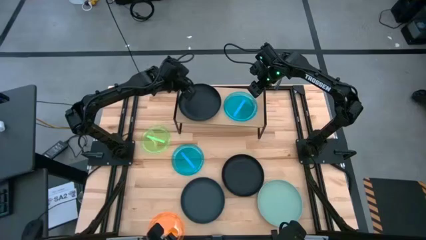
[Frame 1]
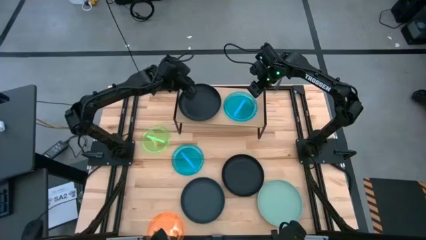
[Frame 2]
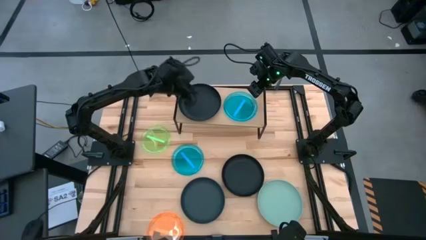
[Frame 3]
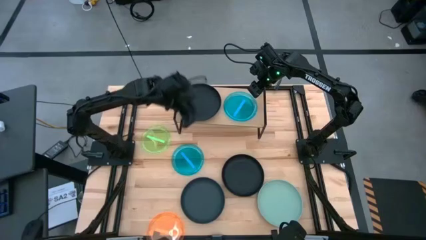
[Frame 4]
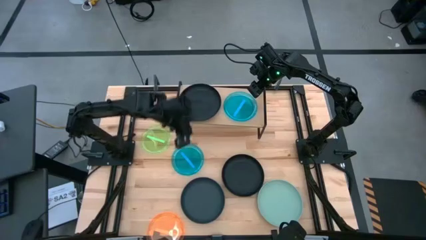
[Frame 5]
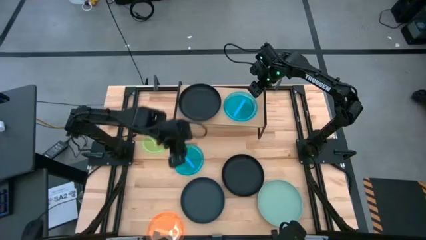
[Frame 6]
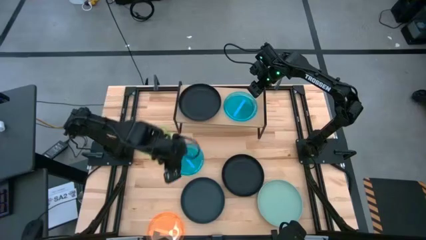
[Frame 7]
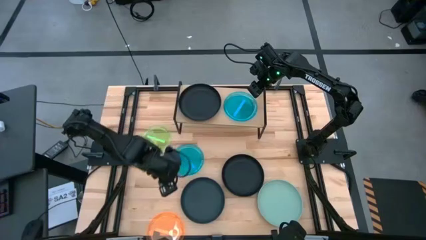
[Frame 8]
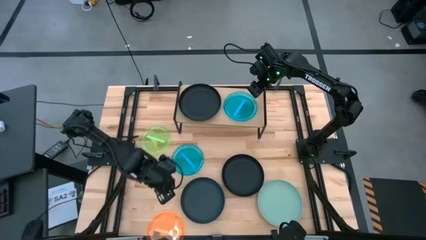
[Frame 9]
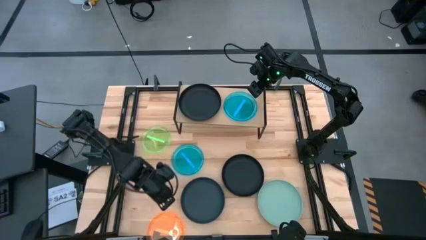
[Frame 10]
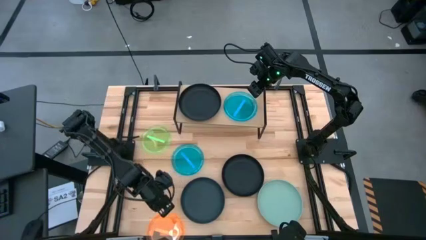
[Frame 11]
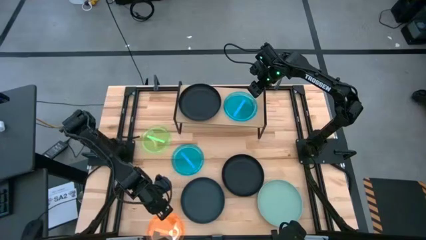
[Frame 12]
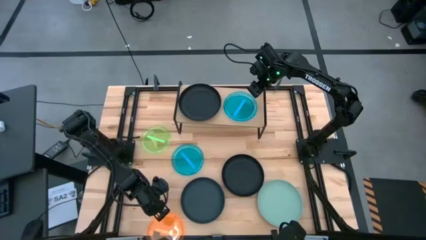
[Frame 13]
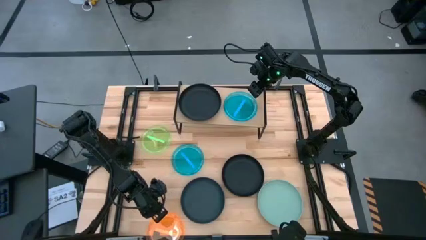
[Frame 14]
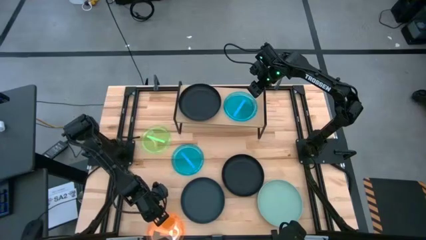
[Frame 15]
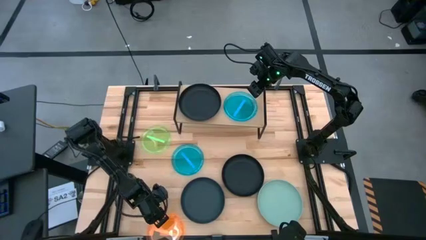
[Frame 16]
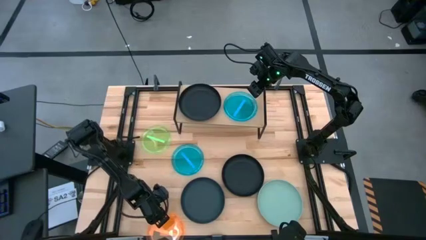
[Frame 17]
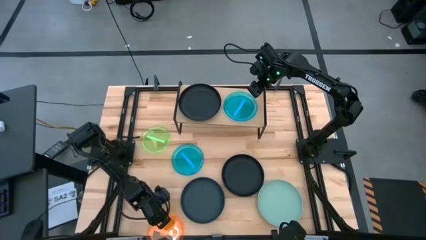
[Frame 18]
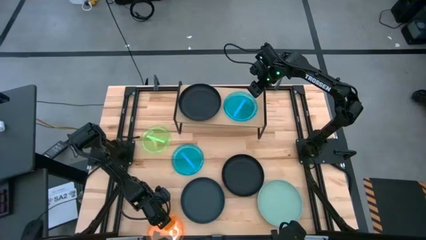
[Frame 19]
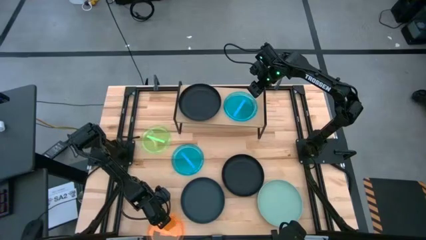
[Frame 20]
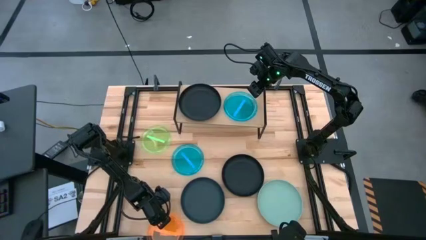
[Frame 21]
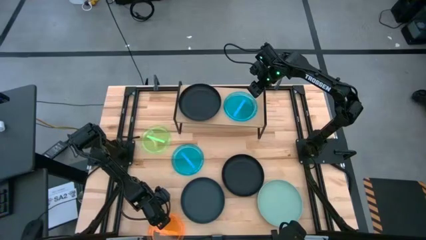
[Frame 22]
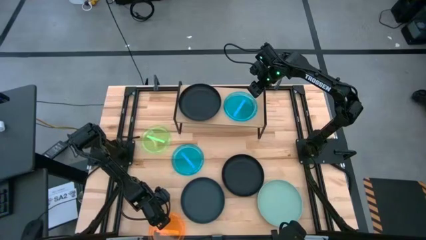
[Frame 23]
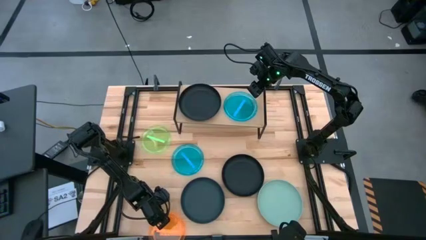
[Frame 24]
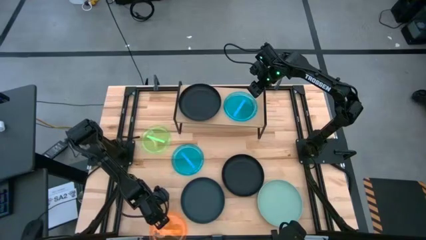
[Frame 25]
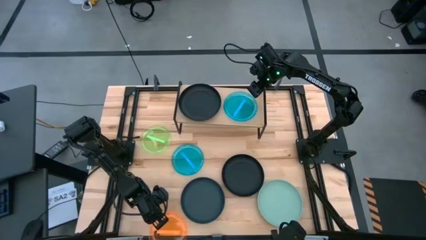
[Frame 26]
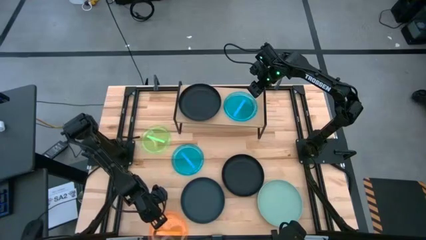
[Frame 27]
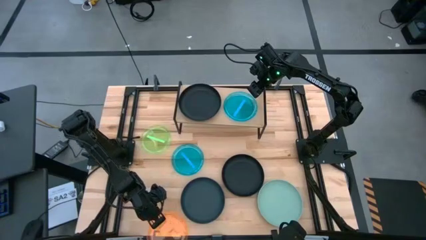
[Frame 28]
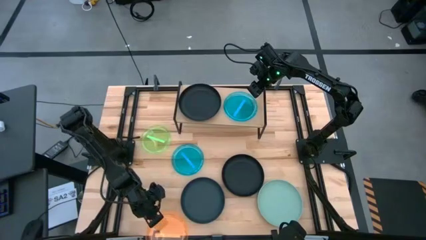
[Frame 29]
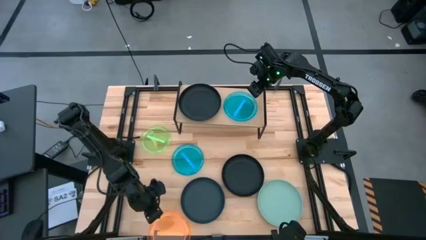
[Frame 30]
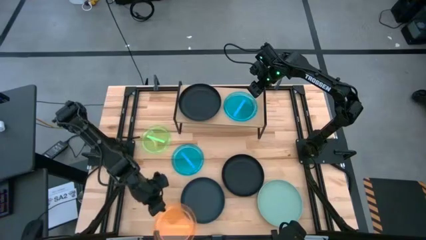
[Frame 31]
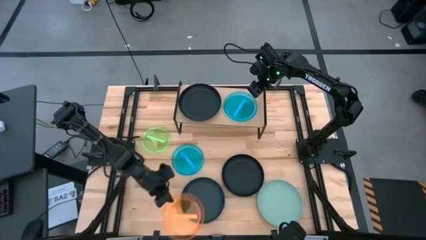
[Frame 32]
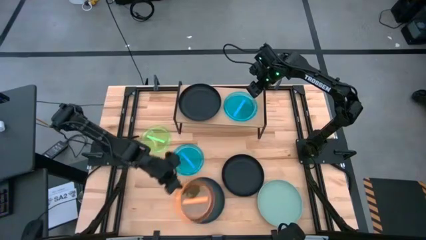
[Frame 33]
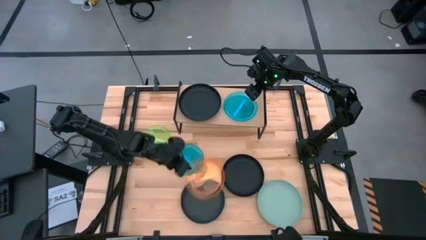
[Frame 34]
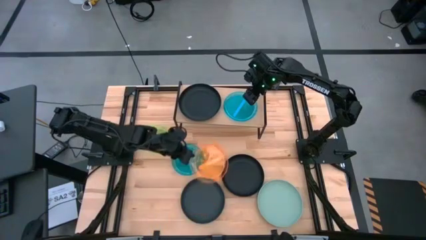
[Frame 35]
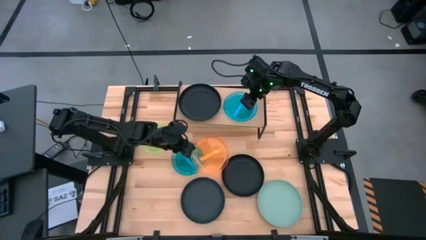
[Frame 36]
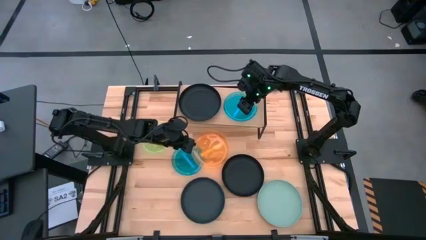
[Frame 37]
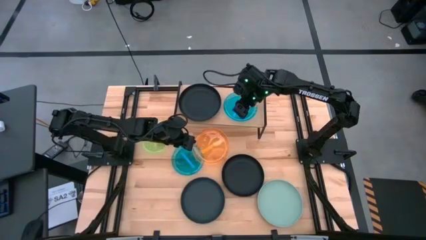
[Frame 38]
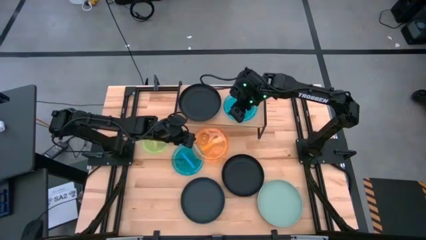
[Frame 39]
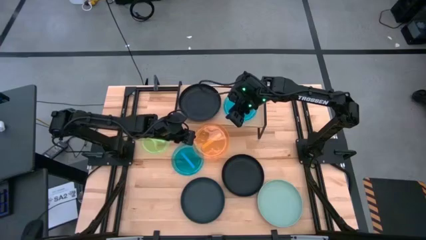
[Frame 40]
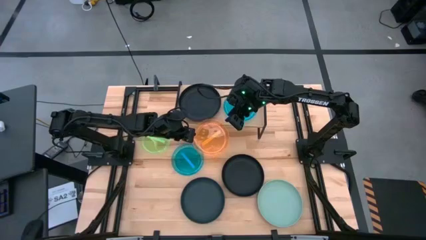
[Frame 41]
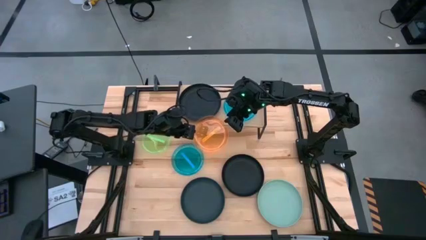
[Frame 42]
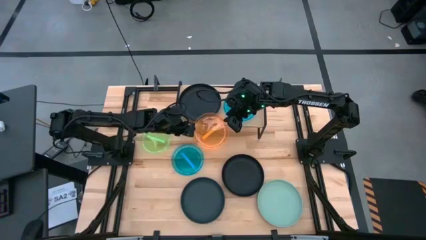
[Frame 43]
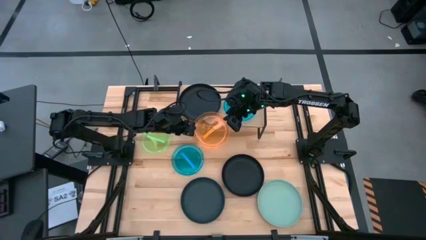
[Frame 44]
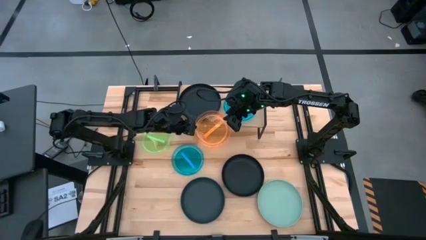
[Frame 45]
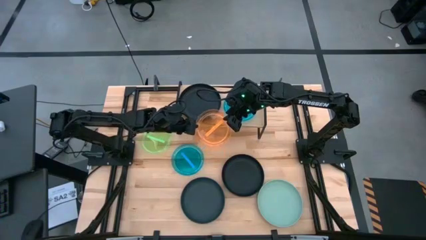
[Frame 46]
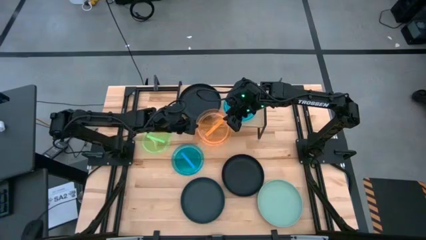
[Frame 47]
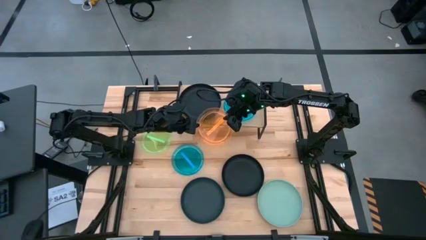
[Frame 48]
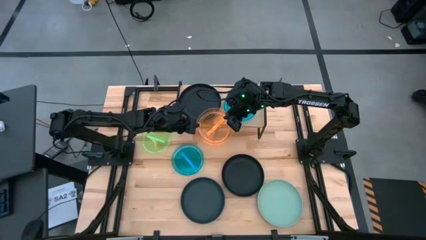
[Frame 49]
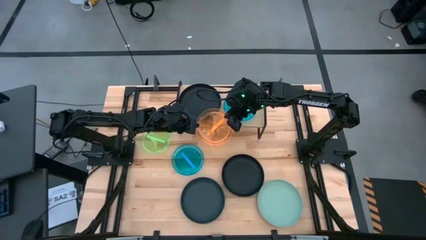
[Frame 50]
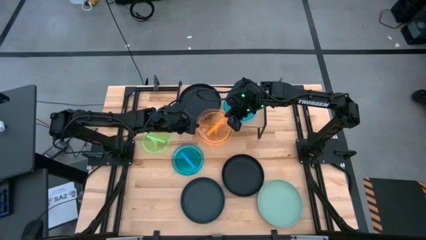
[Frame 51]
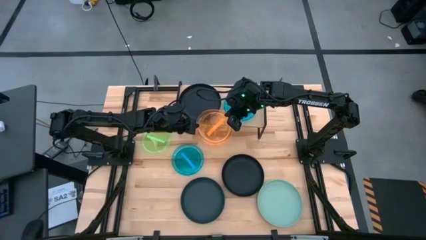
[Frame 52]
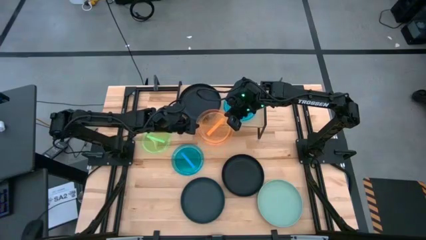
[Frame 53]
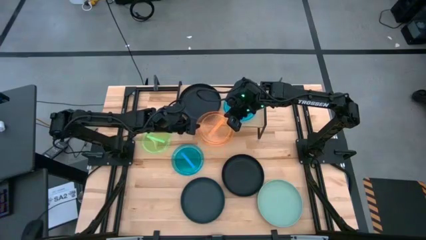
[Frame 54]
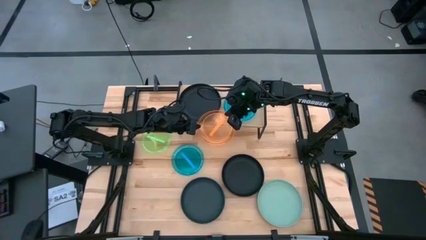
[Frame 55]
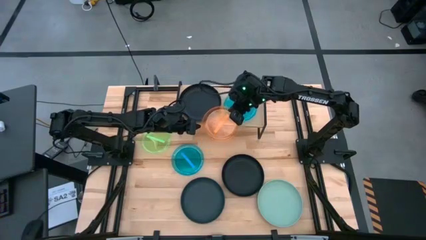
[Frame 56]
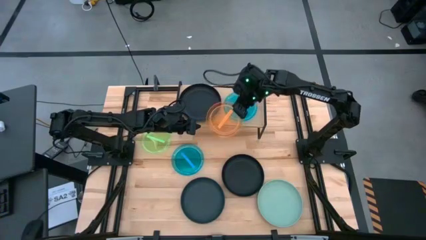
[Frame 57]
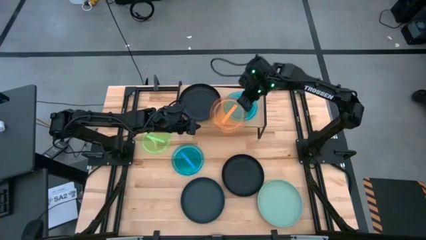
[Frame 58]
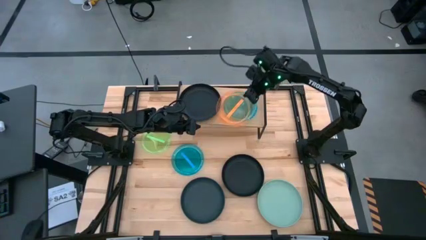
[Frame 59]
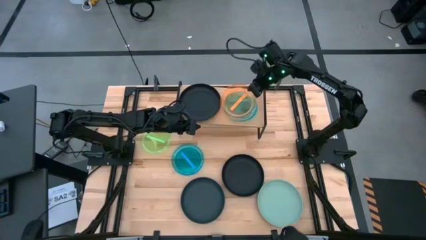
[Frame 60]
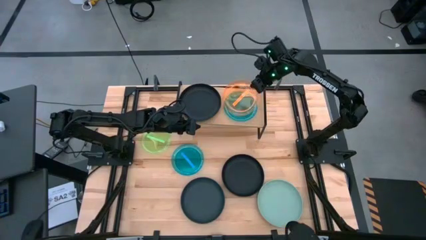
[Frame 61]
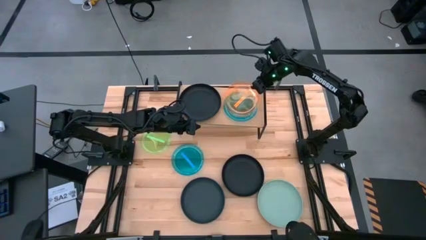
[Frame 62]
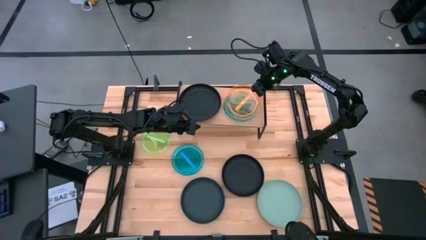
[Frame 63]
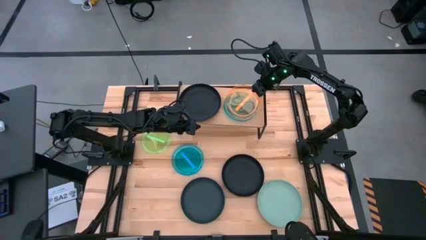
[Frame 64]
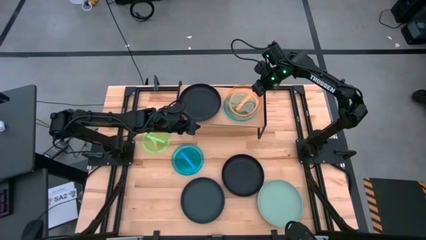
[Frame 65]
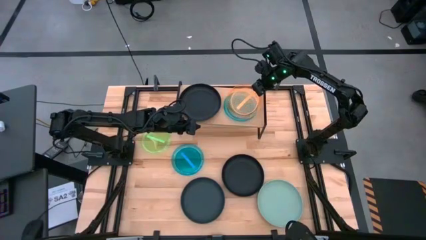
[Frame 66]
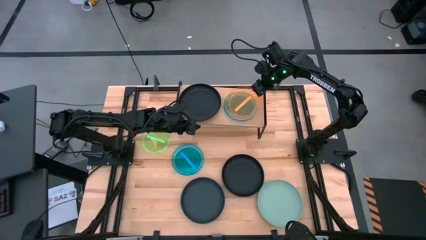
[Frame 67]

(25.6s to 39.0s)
Task: Place and stack plates onto a shelf
Stack the orange plate on top of the blue plate on the shelf
